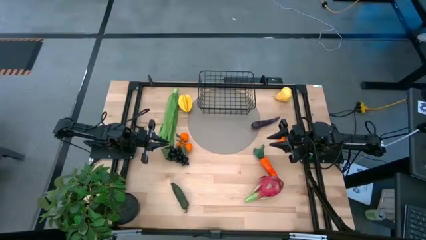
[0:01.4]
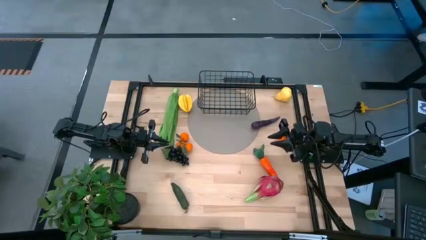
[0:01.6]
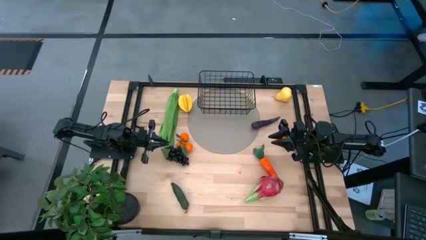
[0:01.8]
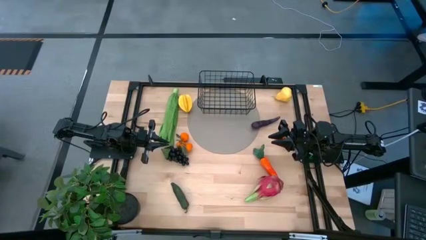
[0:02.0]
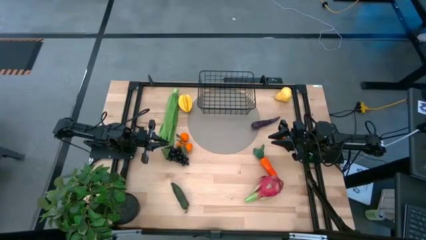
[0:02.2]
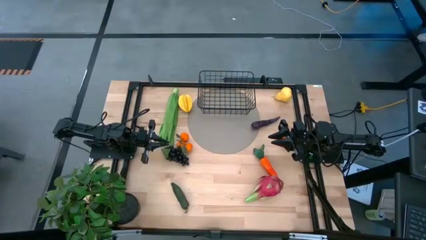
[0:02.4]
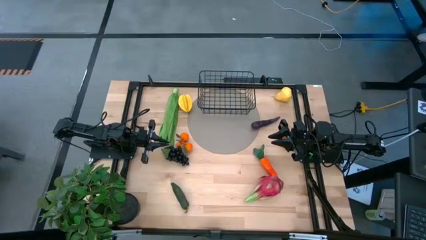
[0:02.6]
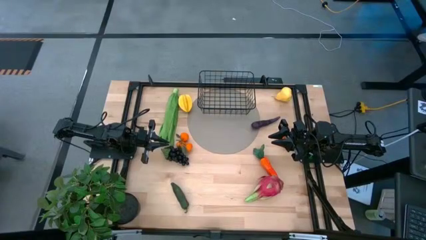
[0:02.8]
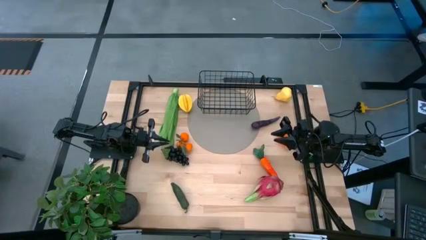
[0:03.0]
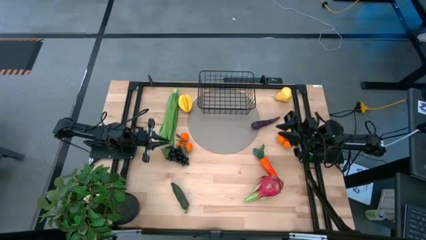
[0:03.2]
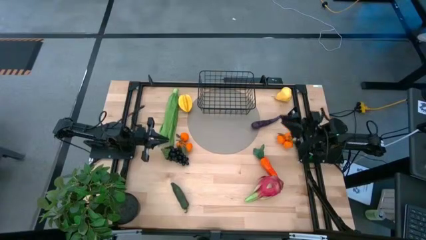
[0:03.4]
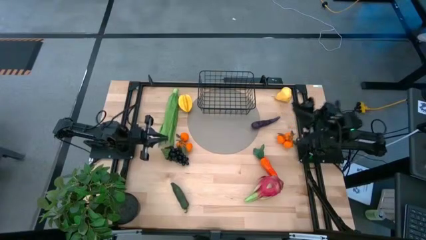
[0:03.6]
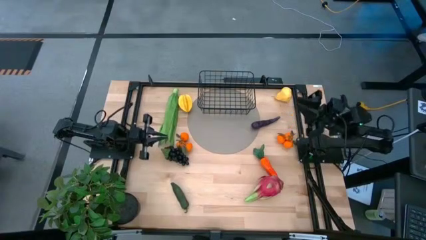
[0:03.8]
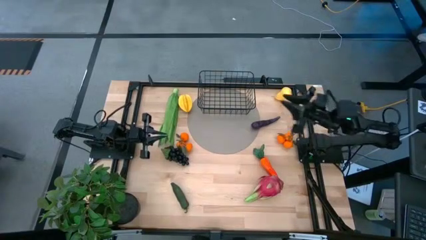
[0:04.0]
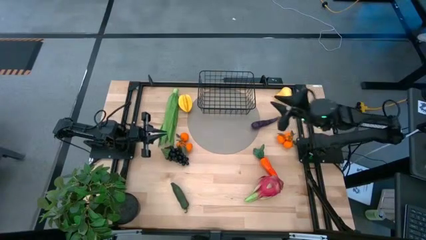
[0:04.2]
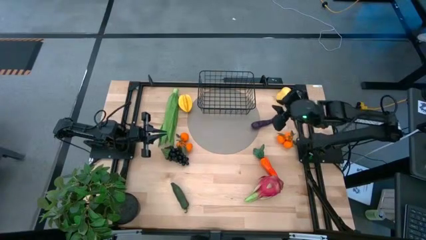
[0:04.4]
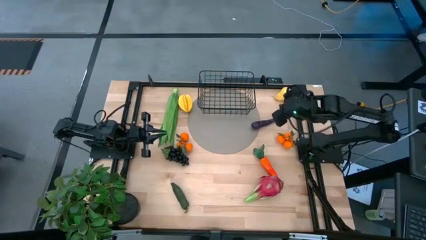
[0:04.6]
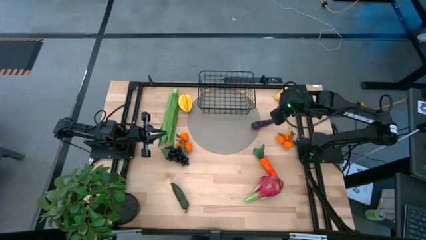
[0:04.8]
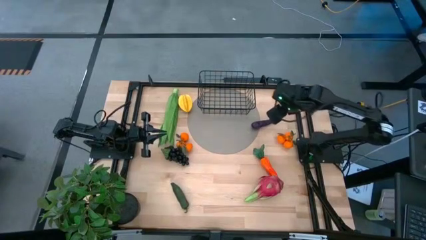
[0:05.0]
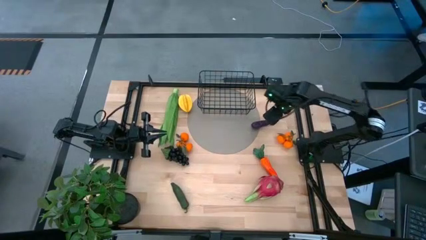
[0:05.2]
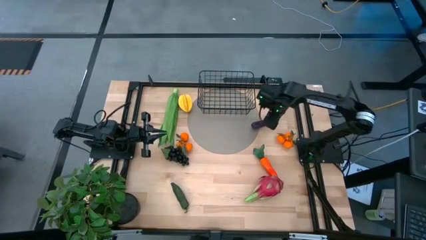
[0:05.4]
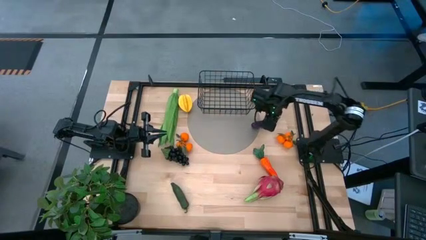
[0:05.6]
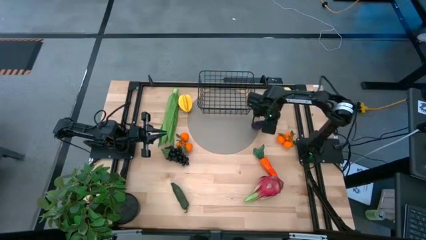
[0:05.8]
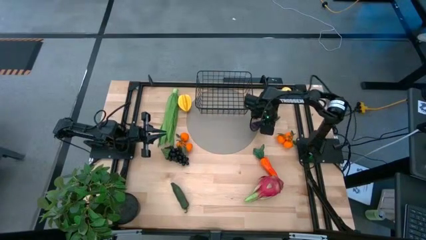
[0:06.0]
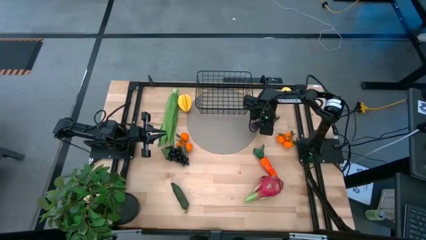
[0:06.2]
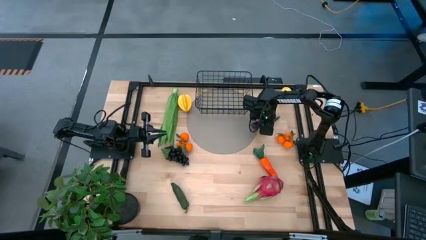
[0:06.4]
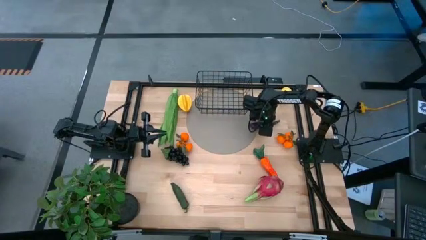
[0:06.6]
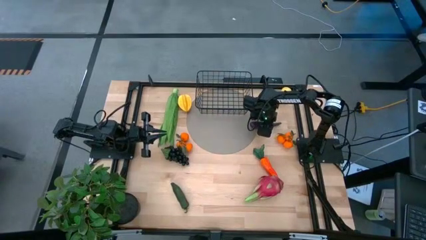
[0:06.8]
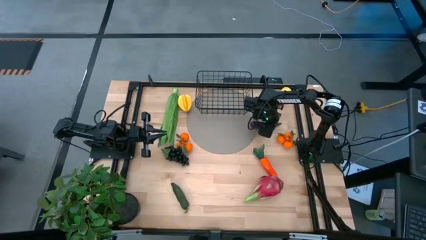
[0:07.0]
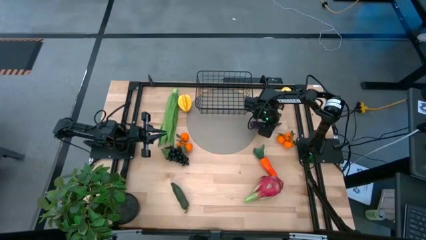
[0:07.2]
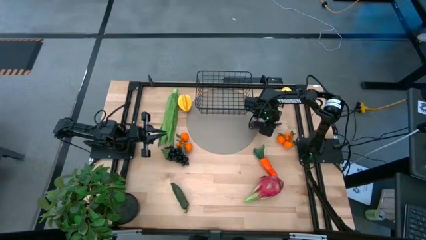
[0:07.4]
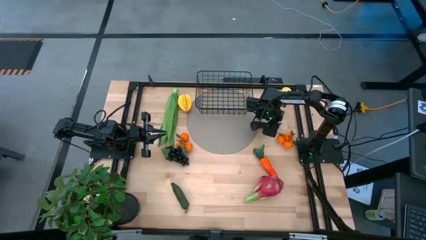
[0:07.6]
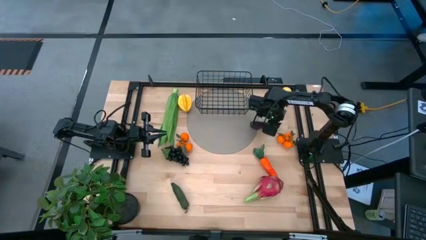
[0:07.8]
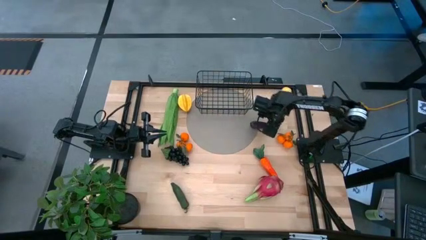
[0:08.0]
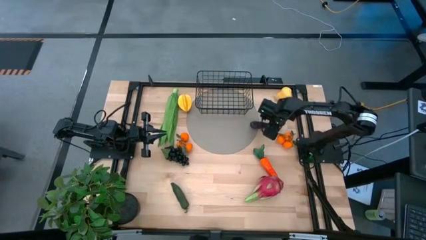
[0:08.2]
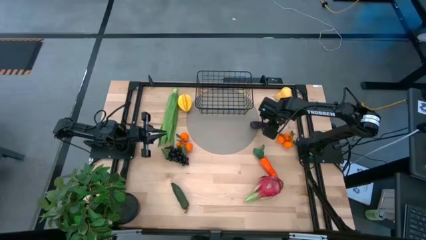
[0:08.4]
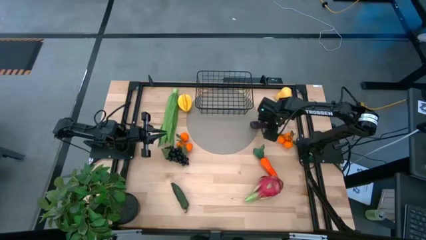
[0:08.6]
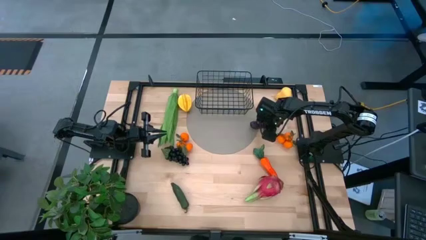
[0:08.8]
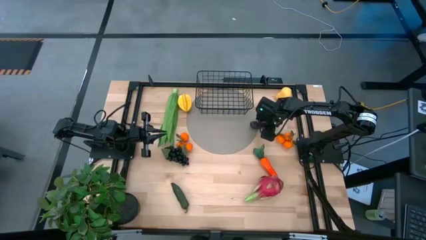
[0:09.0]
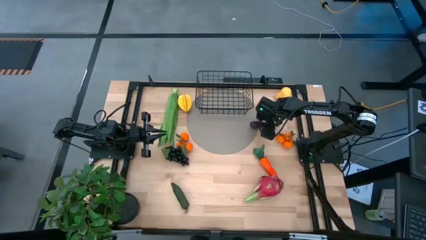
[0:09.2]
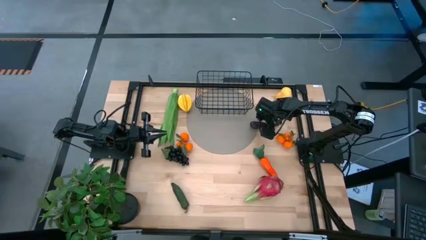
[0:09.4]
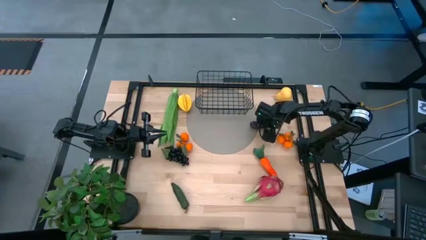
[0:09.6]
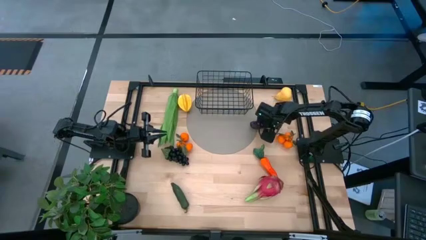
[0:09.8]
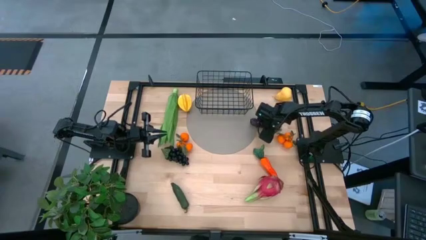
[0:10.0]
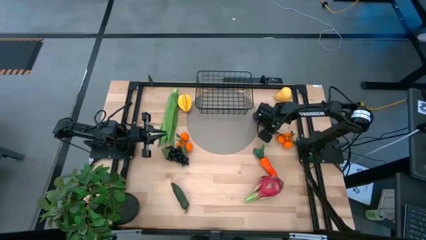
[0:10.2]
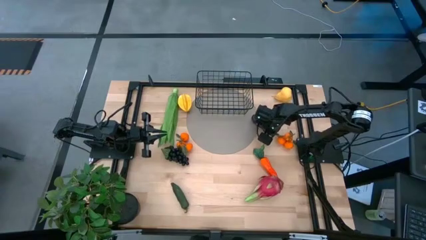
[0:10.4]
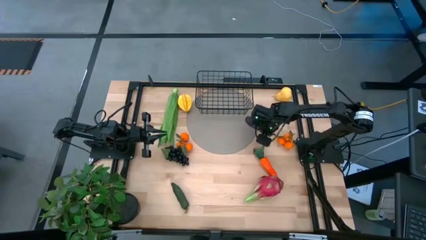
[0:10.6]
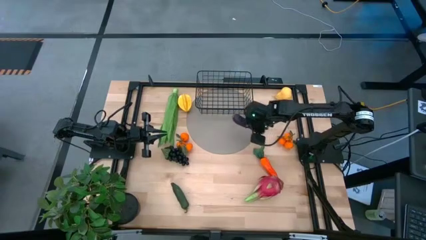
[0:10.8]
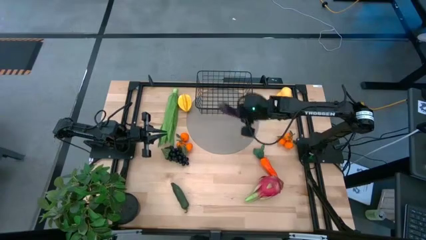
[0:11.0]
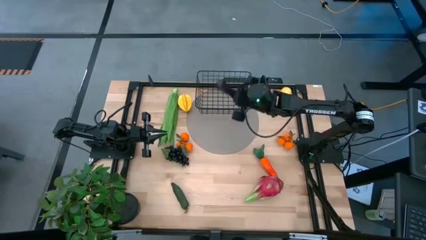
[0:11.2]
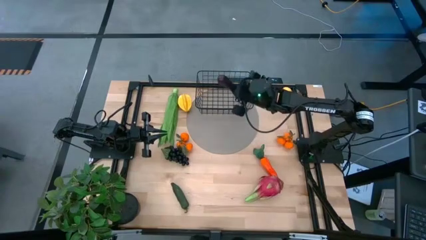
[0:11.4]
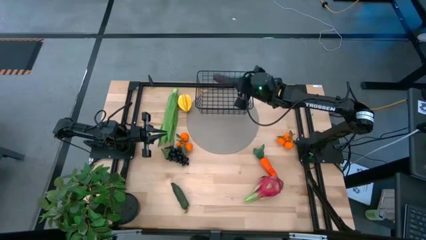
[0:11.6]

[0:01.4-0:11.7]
Task: Build produce basket
Put the purple eggplant into the black wire basket

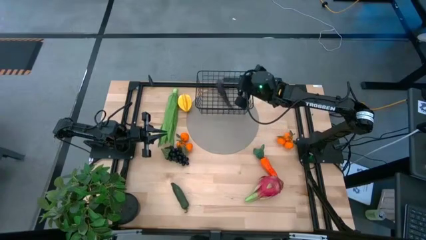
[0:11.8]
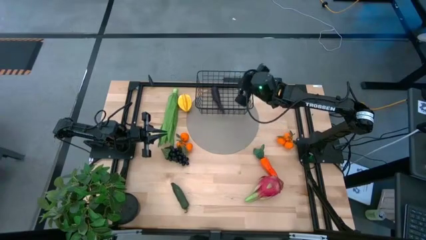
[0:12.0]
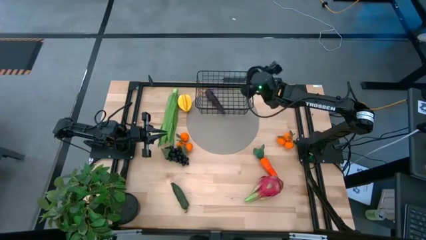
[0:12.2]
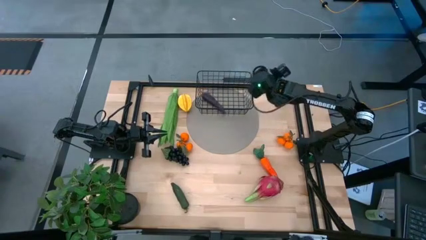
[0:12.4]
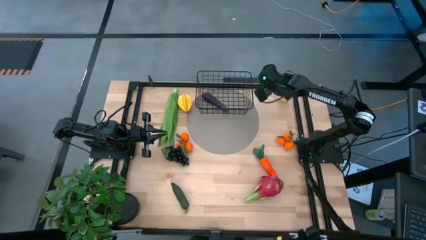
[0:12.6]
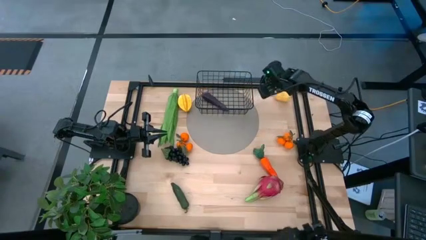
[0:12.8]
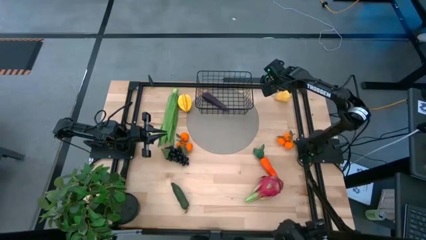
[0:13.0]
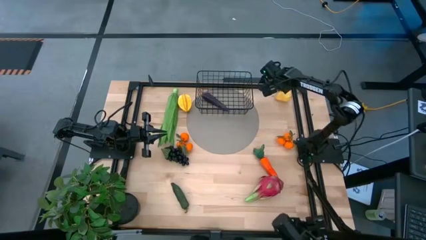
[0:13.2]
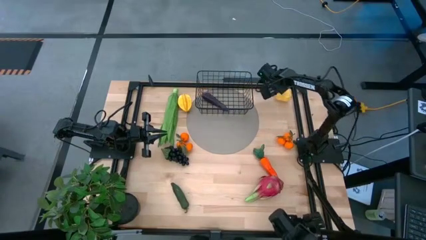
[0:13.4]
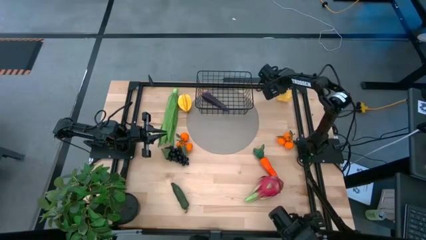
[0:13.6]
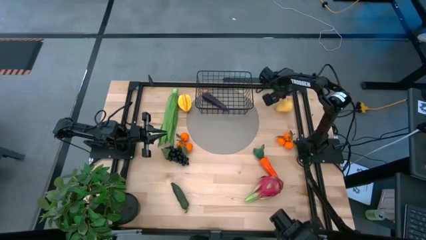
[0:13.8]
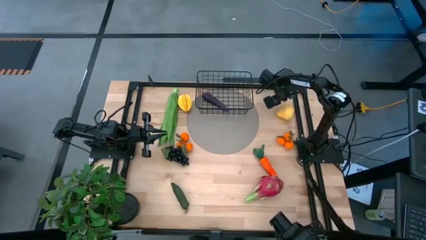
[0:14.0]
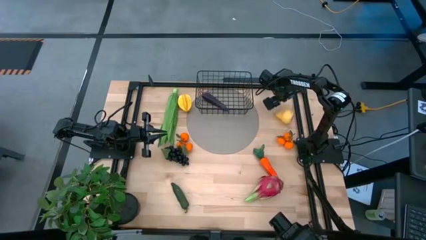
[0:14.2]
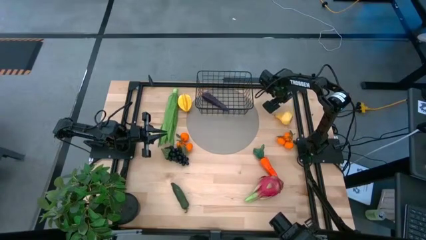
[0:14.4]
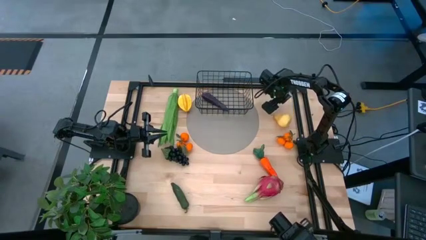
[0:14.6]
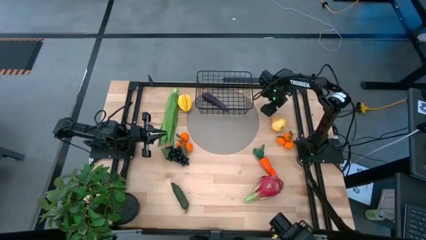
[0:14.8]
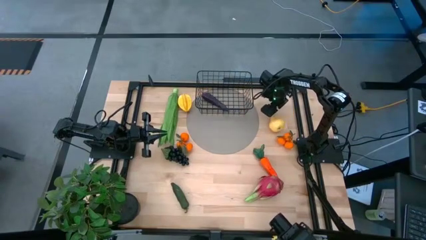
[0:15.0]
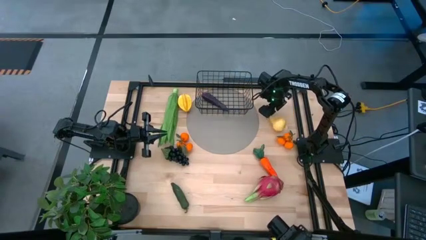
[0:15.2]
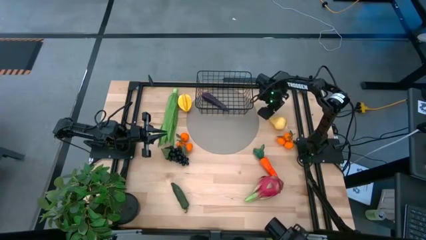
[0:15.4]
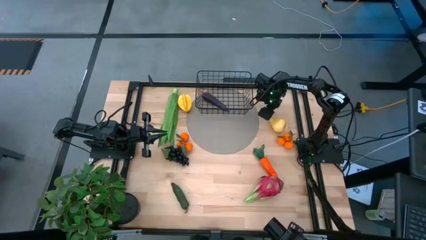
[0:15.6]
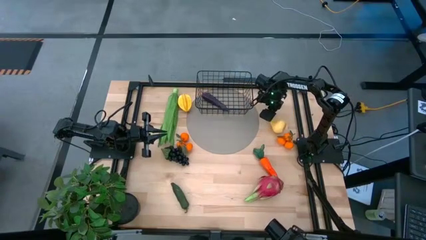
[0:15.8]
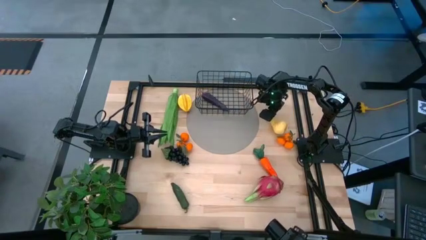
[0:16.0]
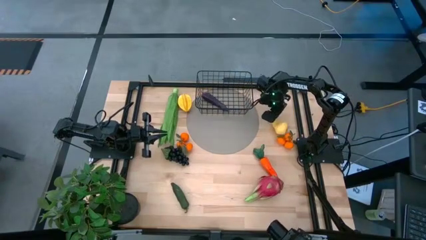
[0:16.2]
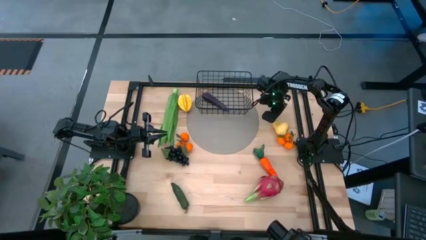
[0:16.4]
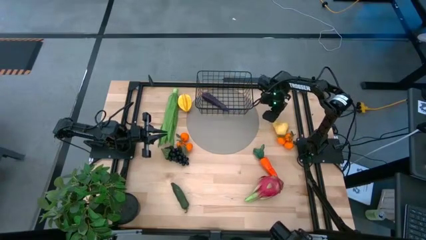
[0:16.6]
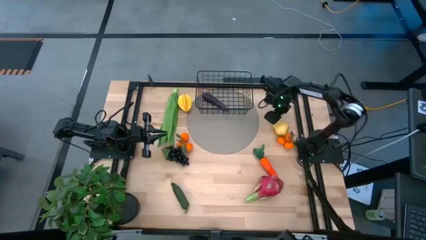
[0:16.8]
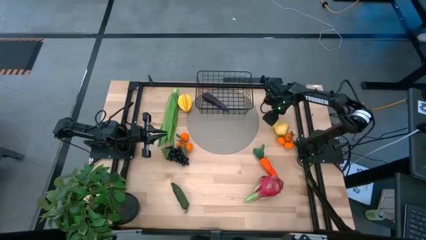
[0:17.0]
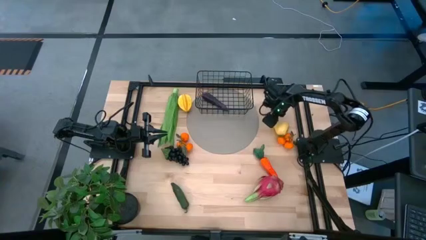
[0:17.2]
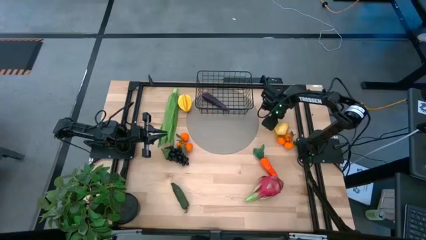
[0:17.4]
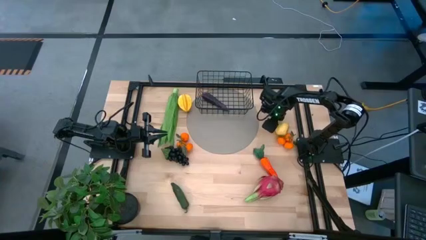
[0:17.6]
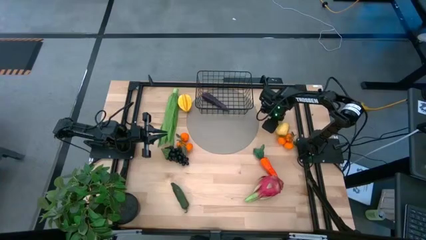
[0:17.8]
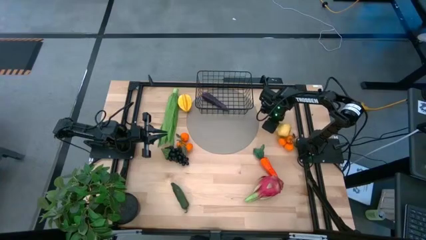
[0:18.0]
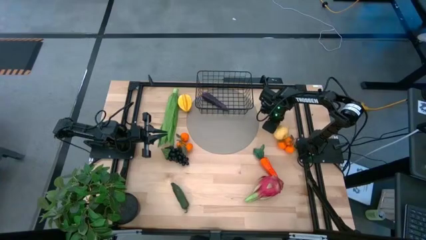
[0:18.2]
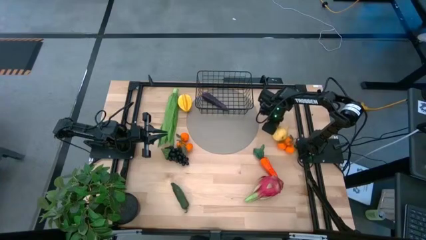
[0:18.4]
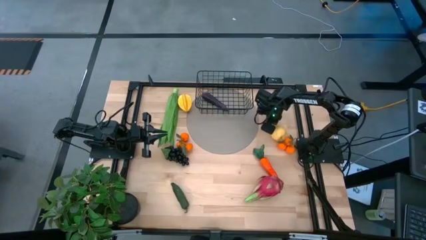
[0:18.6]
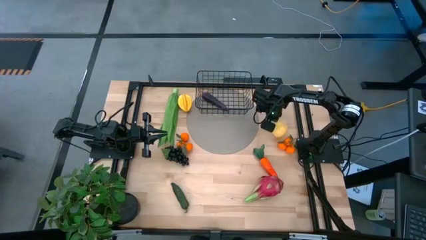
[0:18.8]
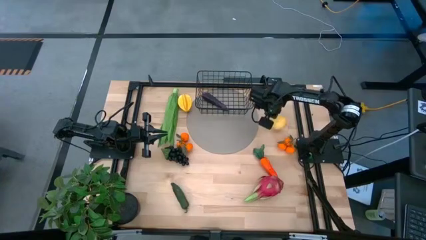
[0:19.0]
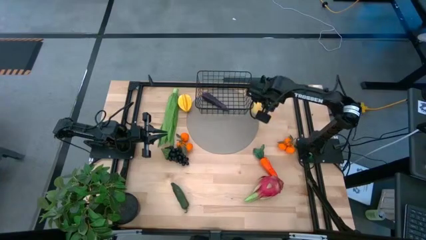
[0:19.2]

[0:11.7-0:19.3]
Put the yellow pear into the black wire basket
